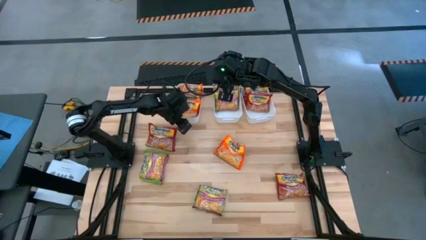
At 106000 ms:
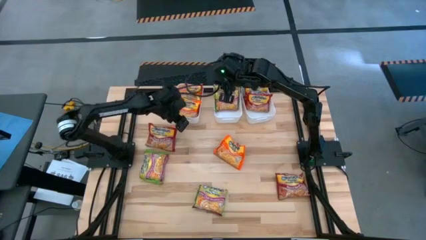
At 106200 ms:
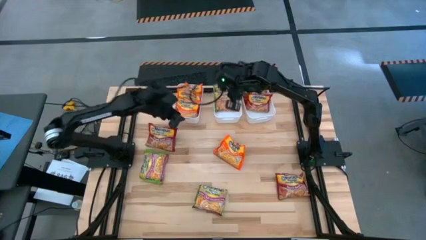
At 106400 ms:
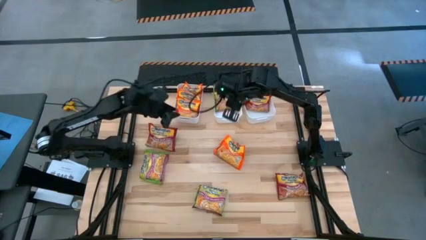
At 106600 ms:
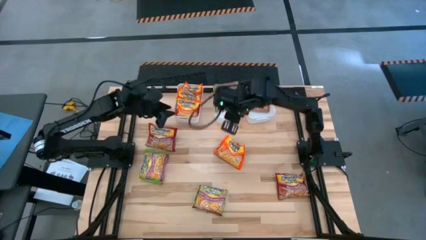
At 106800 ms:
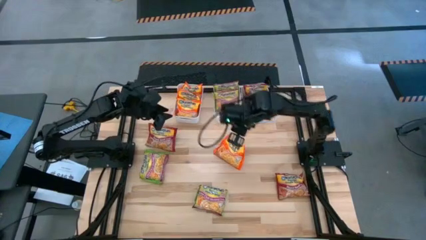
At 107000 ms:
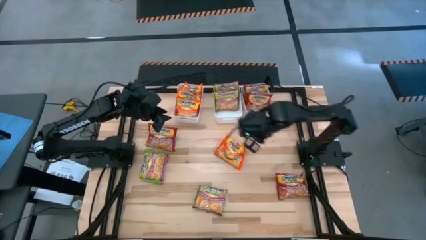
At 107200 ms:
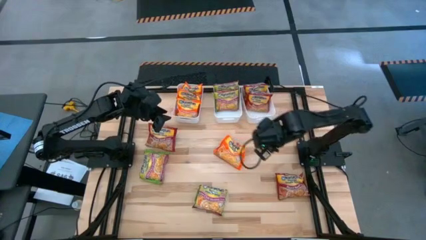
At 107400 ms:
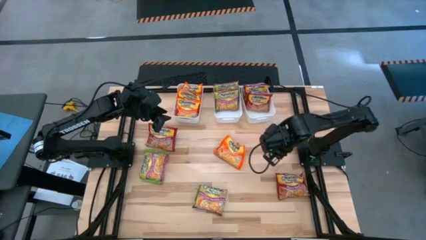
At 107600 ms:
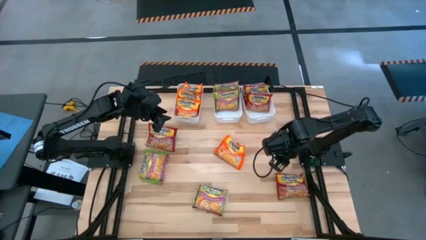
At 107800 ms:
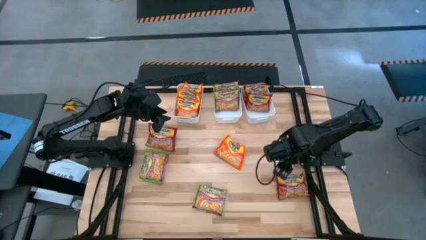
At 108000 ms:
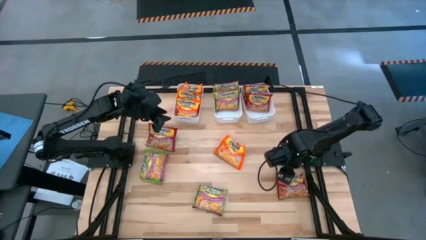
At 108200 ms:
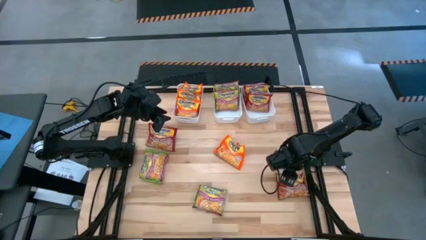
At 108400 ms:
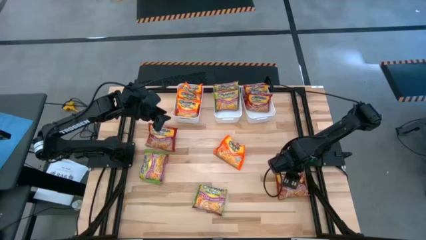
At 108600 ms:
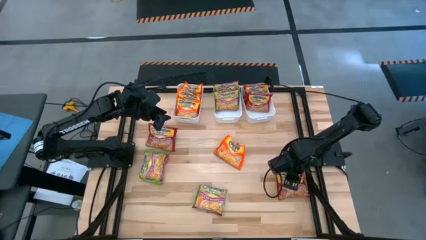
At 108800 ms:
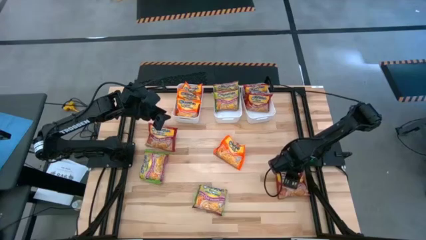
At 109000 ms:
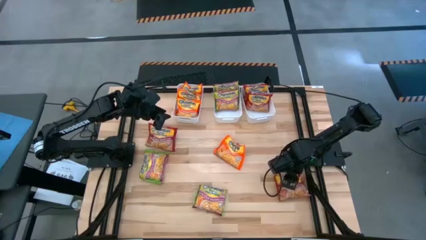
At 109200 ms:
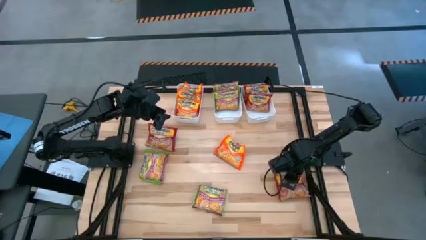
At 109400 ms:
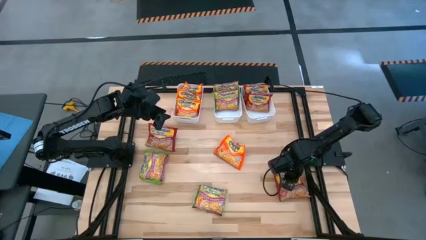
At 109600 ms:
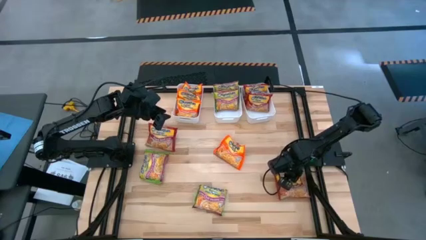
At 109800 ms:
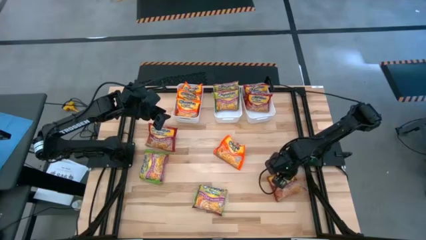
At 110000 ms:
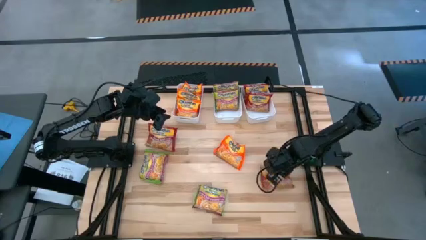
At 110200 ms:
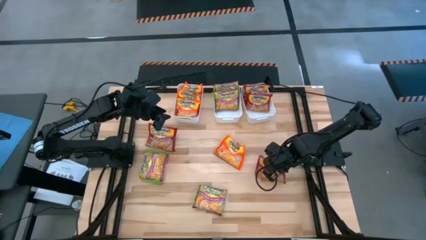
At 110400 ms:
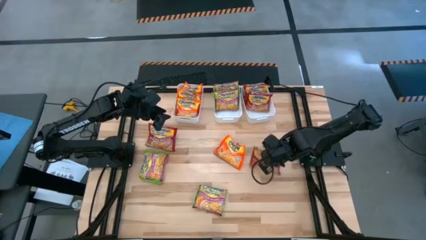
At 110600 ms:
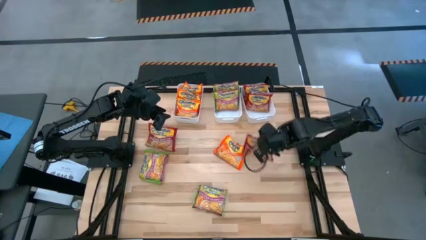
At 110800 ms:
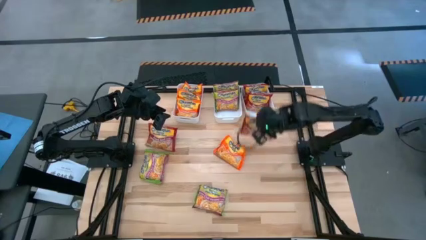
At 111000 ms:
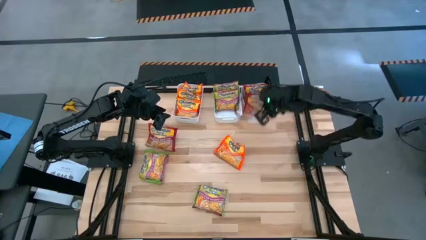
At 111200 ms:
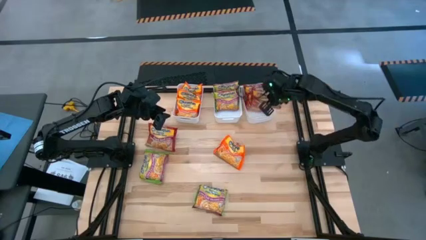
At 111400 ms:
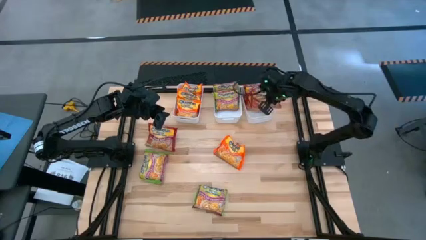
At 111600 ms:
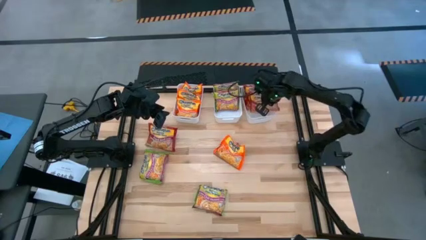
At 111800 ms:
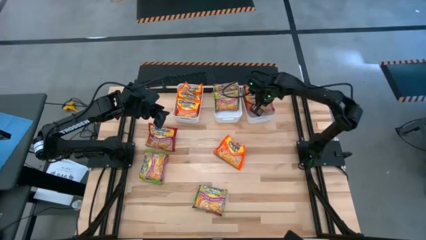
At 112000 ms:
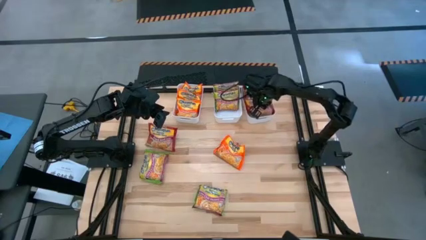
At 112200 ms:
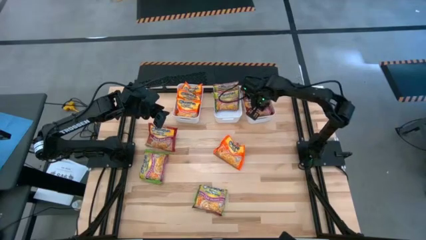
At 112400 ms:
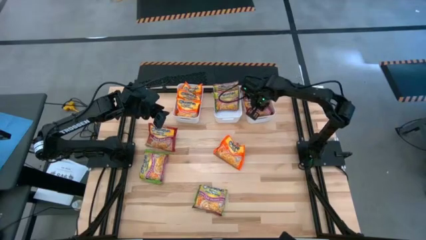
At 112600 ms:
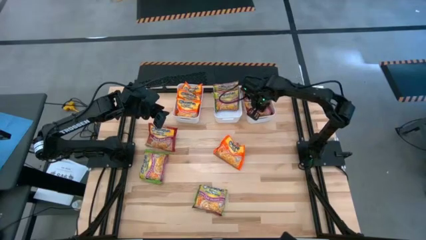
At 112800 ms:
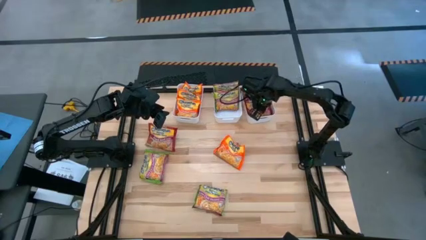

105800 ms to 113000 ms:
Task: Sort Maruchan noodles
Put the red noodle pack into the right white bin

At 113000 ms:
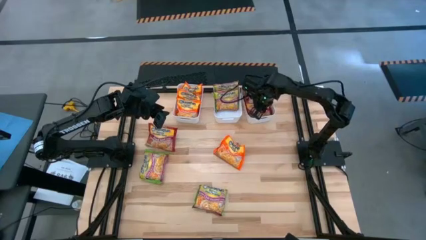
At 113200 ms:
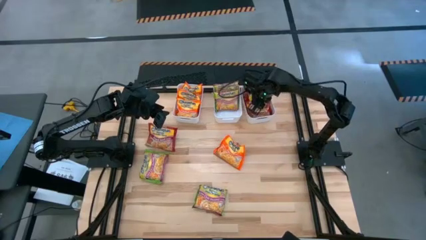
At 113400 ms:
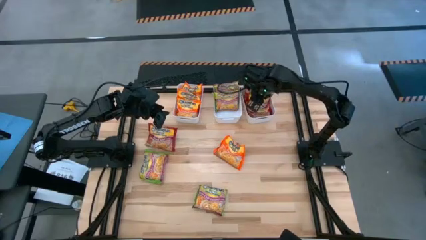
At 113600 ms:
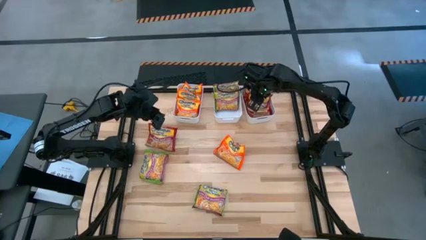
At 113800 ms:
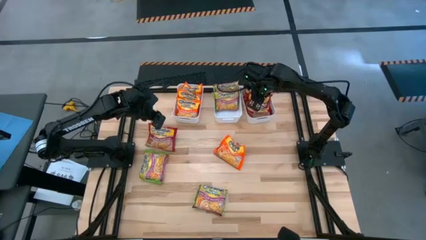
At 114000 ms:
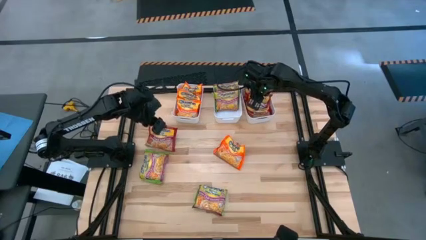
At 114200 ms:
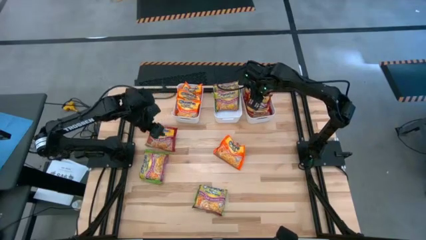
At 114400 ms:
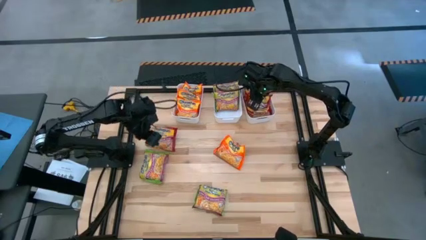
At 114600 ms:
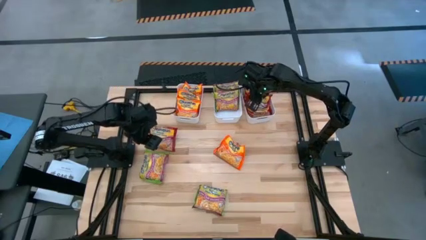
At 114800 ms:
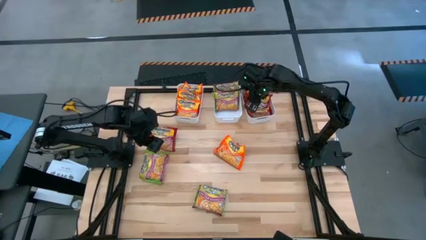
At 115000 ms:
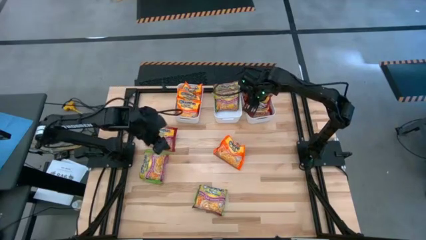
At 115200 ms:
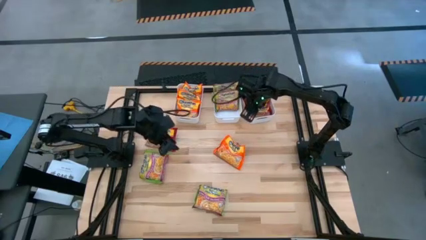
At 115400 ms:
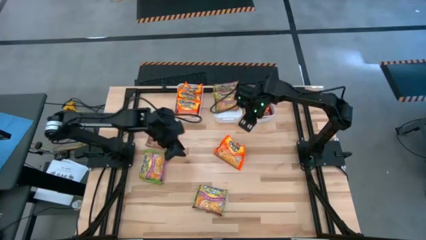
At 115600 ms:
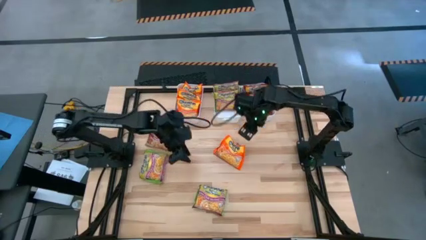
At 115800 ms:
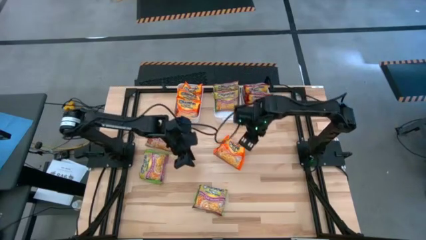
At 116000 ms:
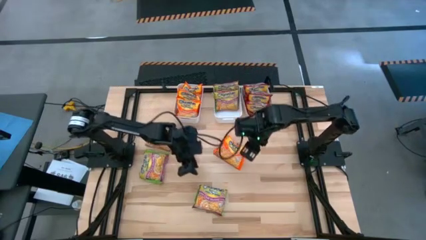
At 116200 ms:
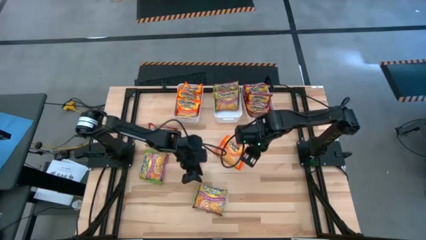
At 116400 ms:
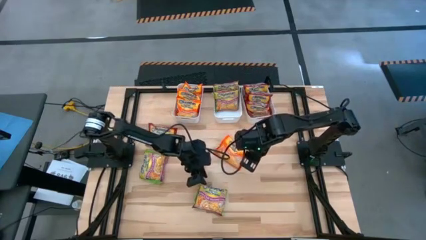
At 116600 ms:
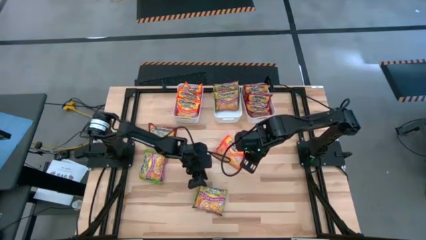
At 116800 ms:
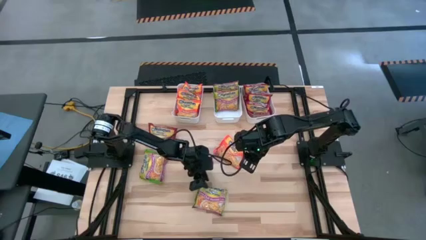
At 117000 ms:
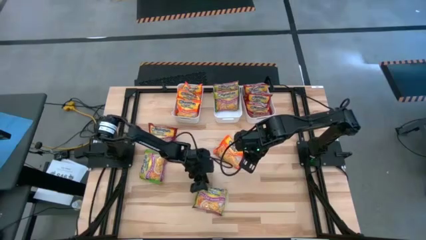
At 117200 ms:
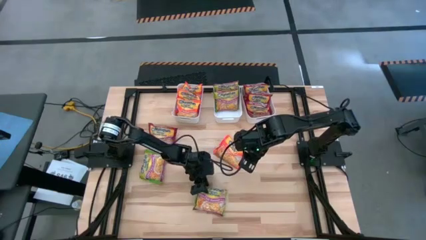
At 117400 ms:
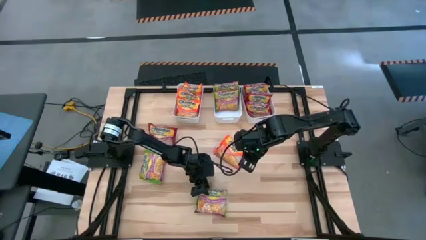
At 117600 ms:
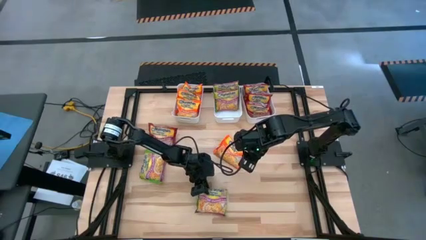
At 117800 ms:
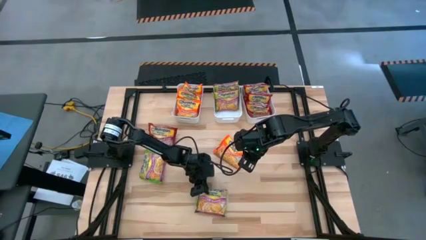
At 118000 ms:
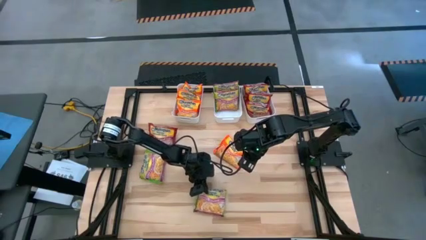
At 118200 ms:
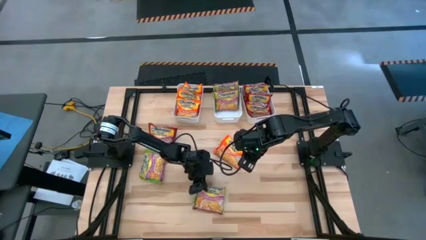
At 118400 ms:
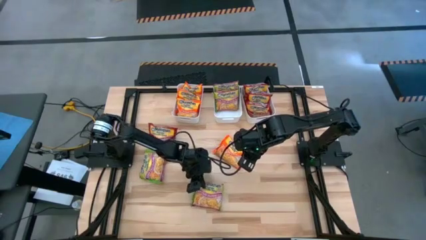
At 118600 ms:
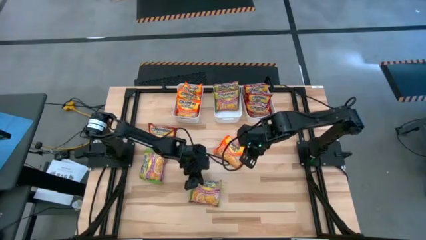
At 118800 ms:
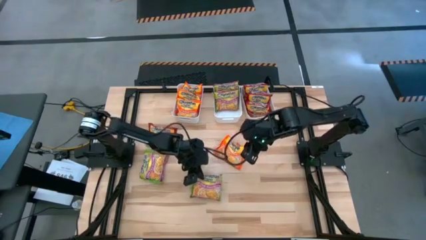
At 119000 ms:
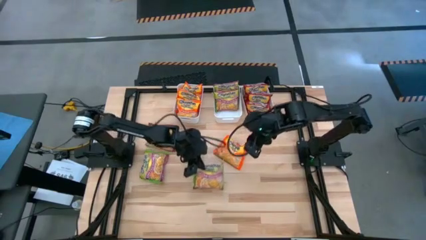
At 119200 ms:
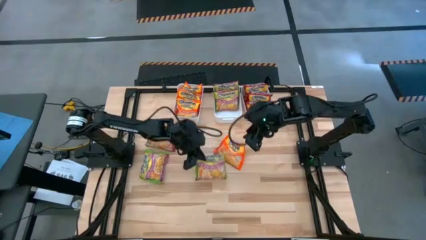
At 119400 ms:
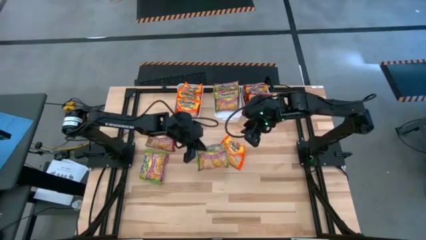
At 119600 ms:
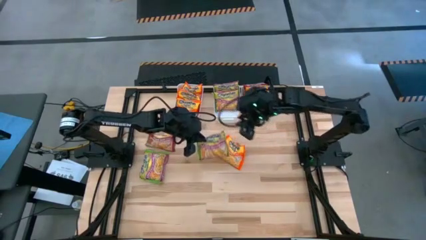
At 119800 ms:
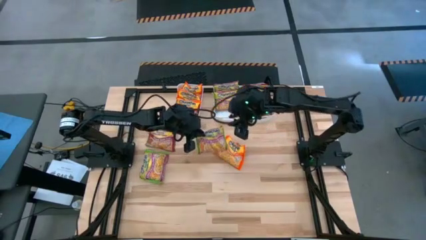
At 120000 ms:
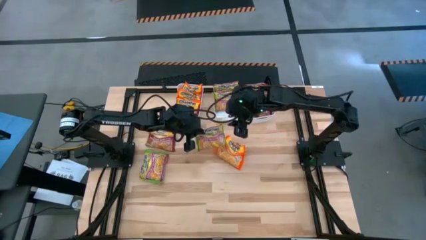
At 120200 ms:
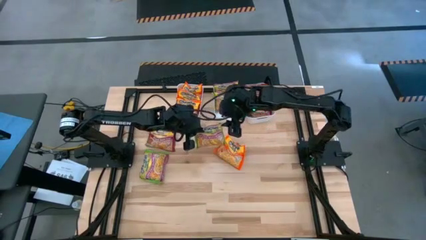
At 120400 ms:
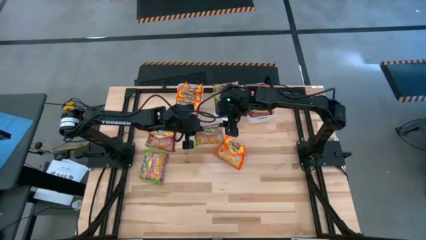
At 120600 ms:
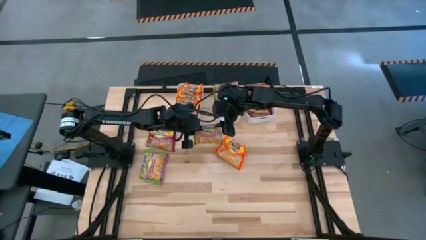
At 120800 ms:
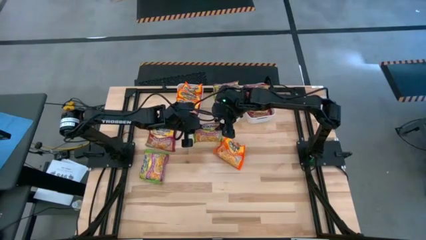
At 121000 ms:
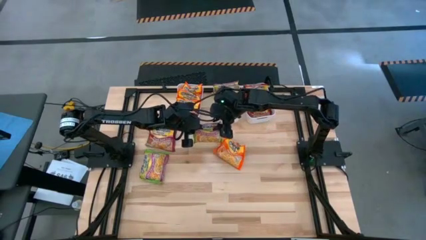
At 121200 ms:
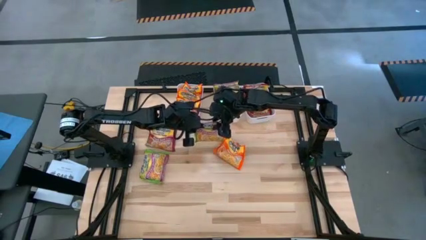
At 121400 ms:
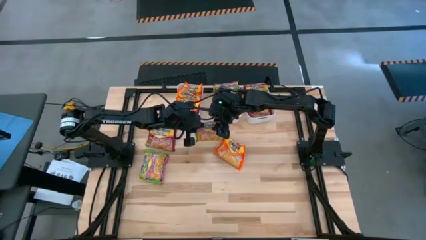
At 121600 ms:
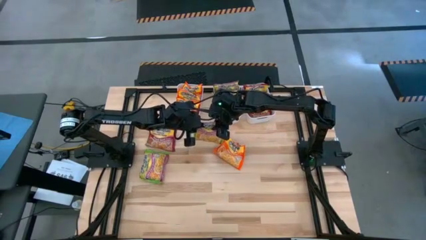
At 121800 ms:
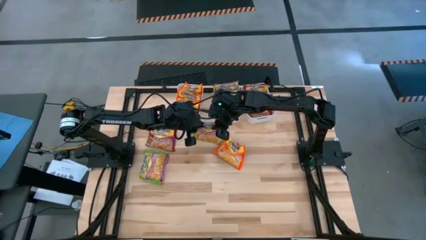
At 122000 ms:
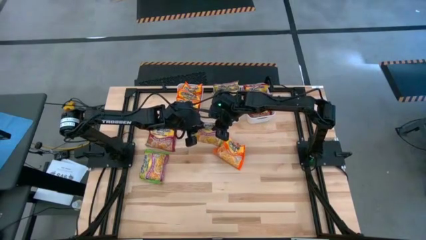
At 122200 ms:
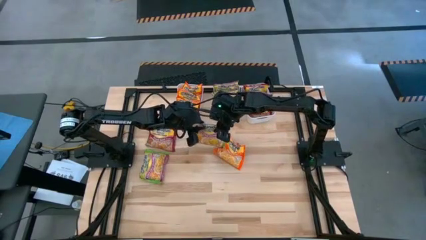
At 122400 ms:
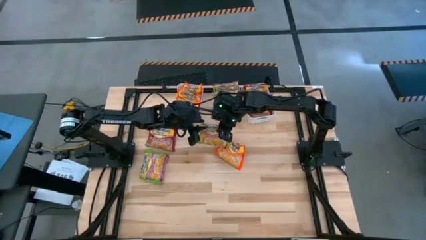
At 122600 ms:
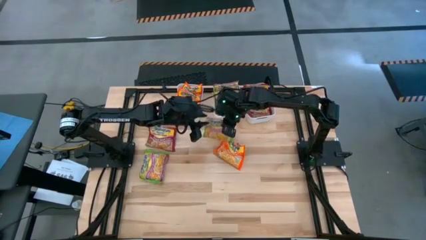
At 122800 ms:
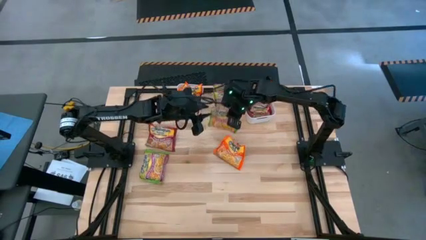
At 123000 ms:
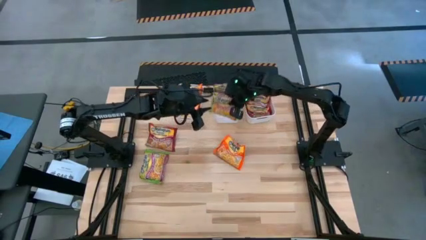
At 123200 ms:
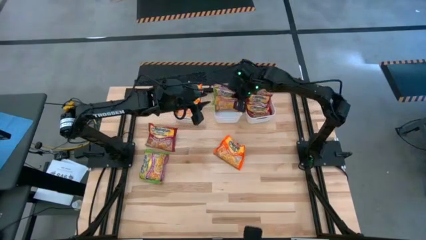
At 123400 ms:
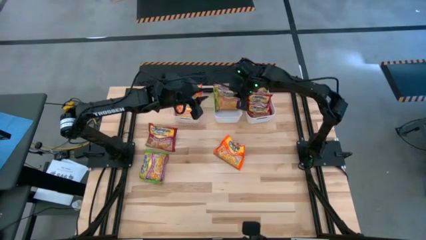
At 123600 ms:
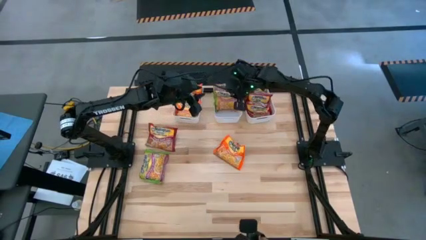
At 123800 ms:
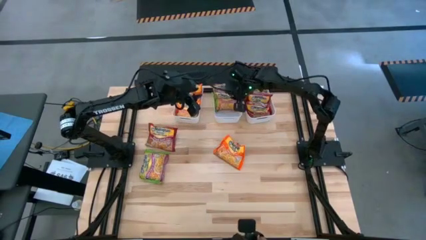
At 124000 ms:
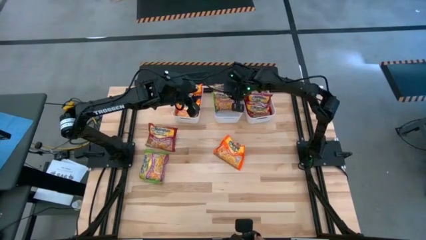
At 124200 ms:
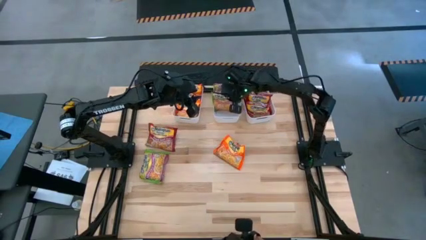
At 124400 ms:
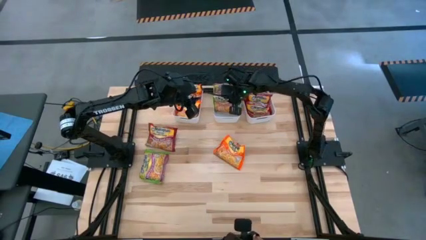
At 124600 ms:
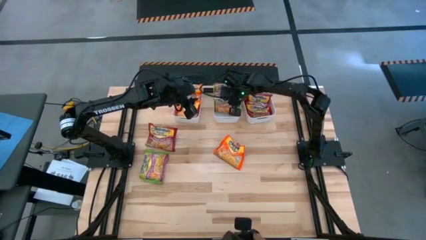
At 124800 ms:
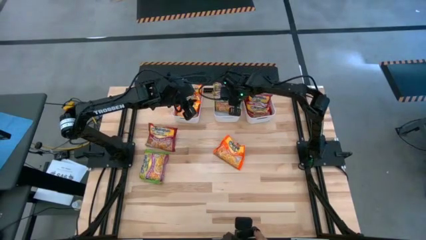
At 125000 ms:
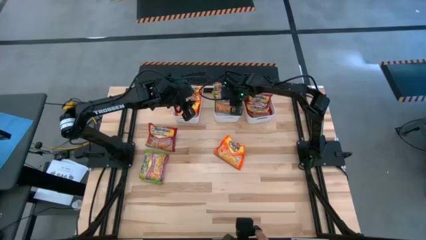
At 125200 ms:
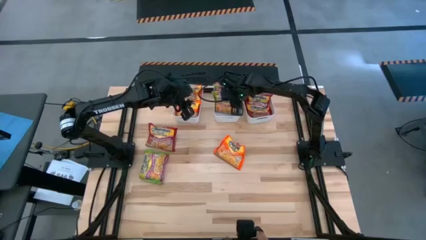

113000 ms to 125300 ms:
Put the green noodle pack into the center white bin
